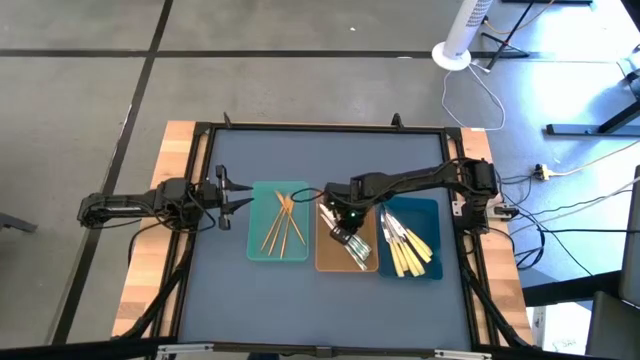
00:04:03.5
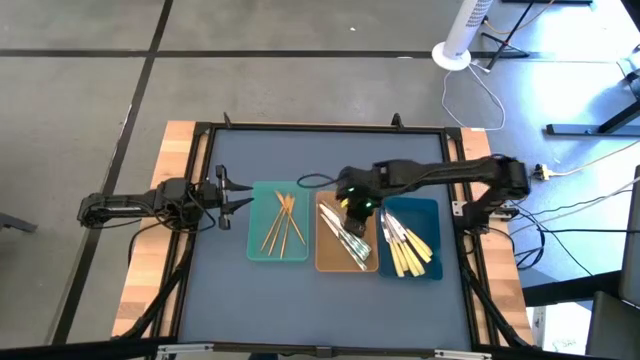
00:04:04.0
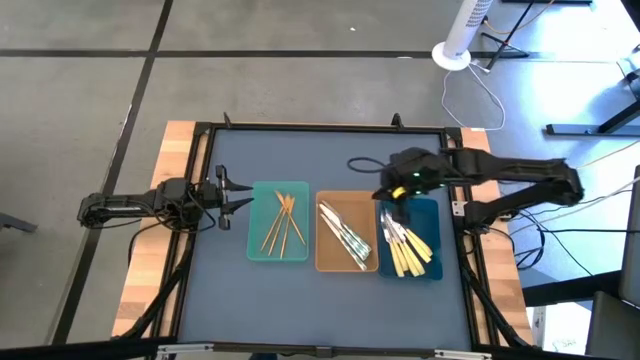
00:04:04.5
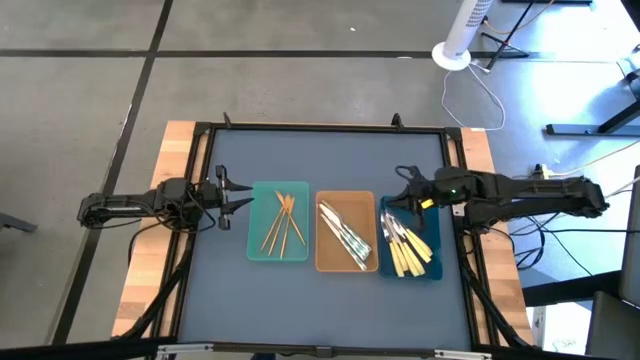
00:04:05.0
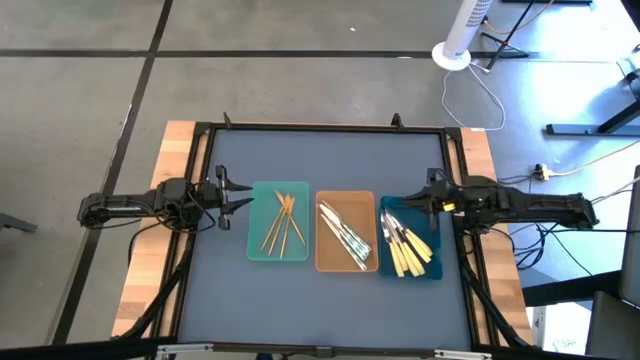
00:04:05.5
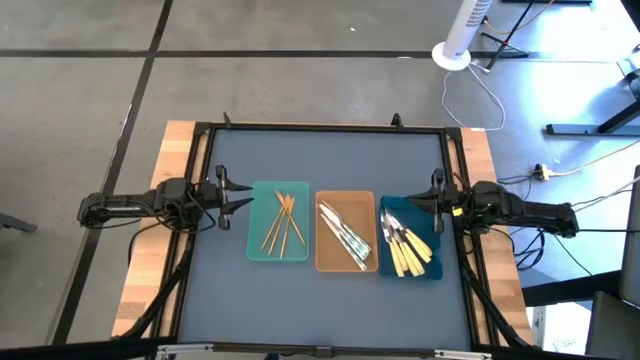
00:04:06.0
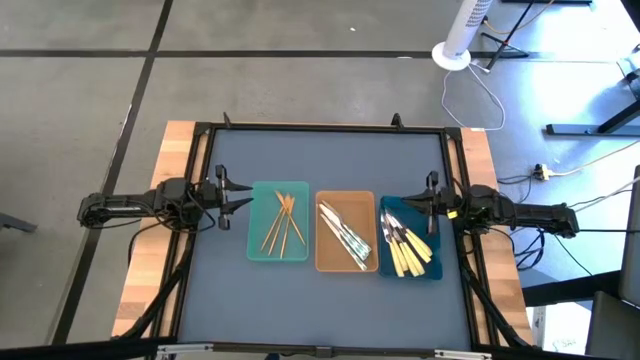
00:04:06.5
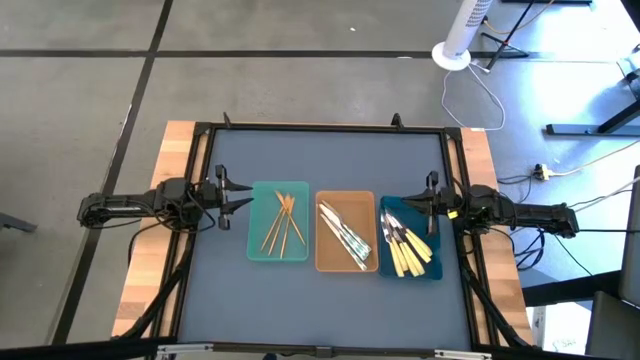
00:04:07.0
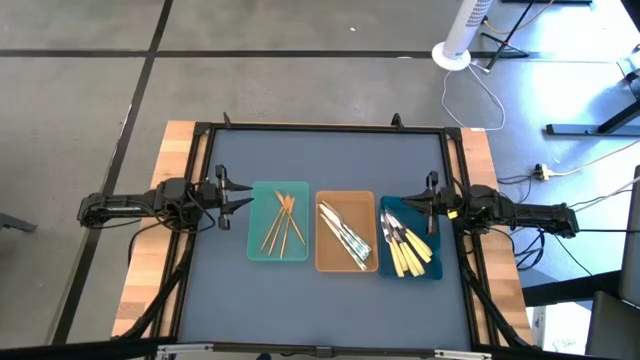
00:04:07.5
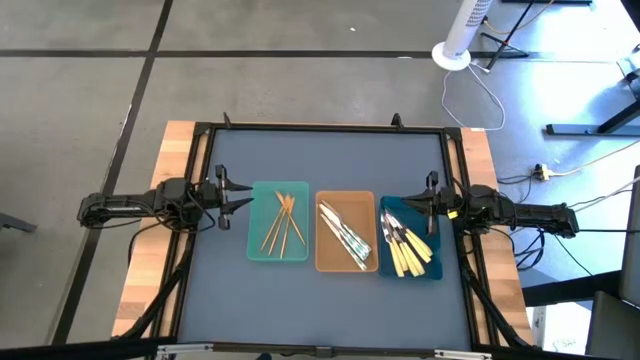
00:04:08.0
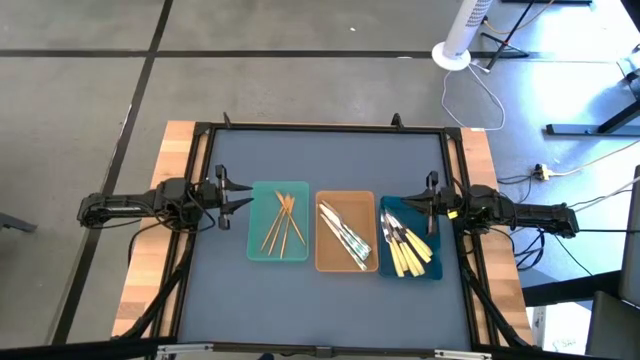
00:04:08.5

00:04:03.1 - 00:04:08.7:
Task: Sort silverware by color (type)
Return to Home Position

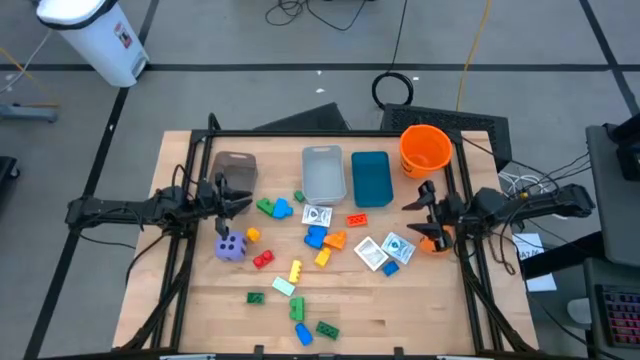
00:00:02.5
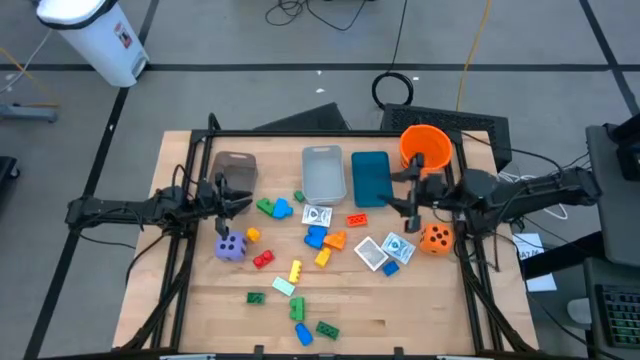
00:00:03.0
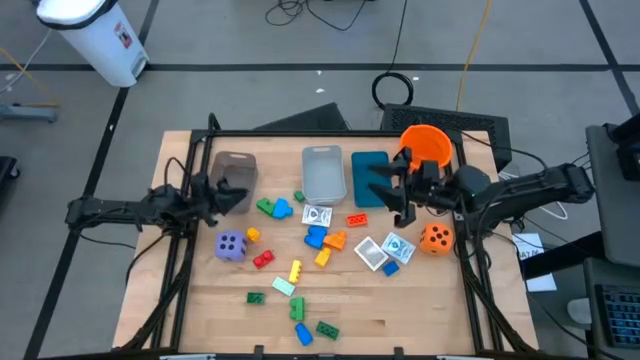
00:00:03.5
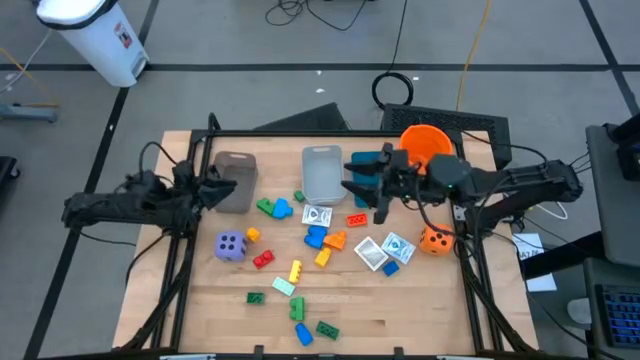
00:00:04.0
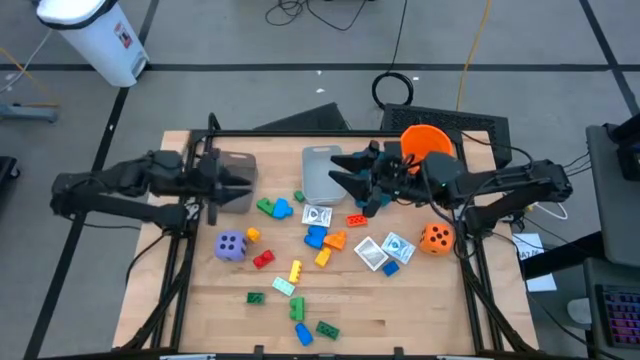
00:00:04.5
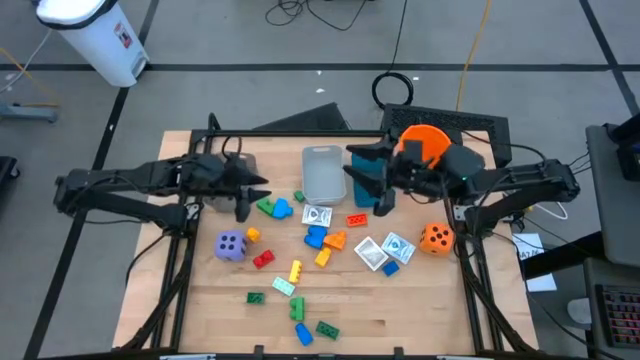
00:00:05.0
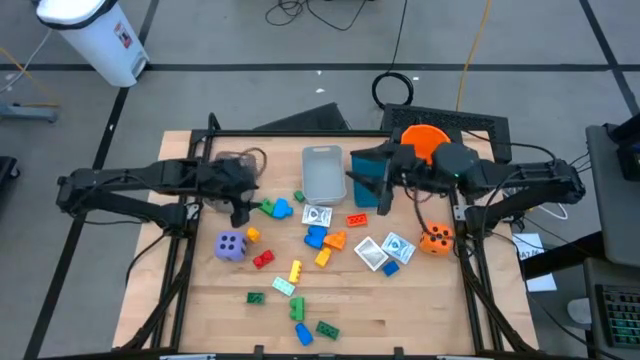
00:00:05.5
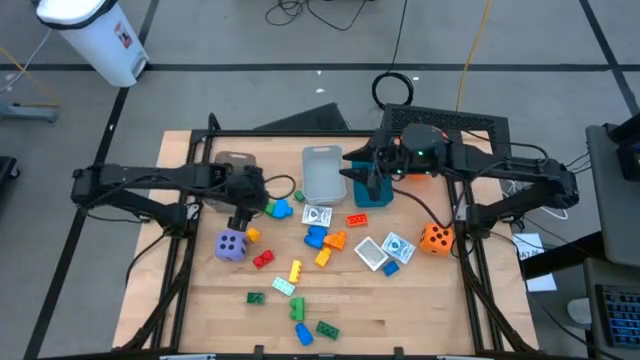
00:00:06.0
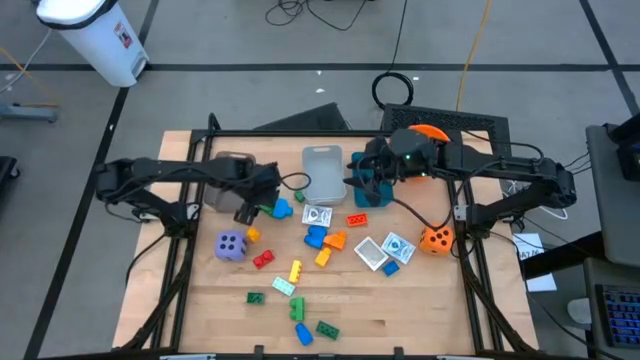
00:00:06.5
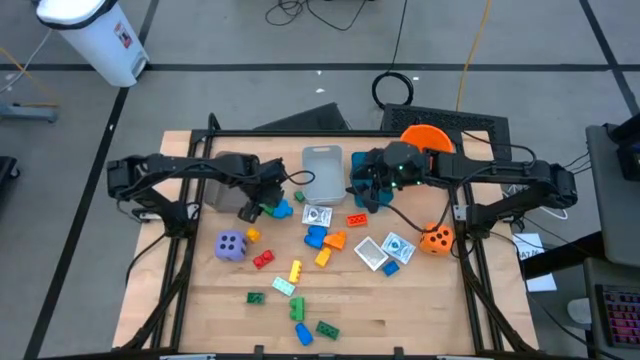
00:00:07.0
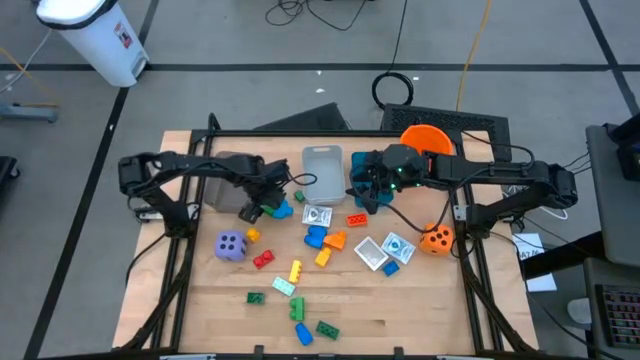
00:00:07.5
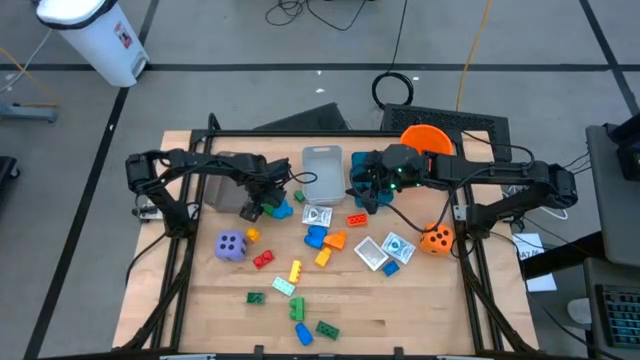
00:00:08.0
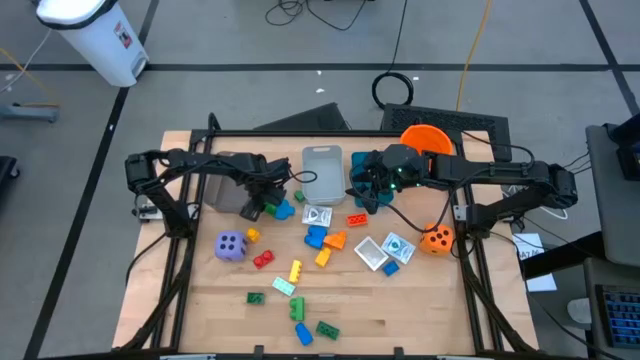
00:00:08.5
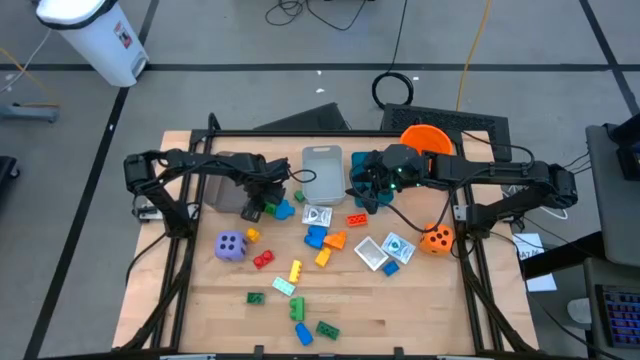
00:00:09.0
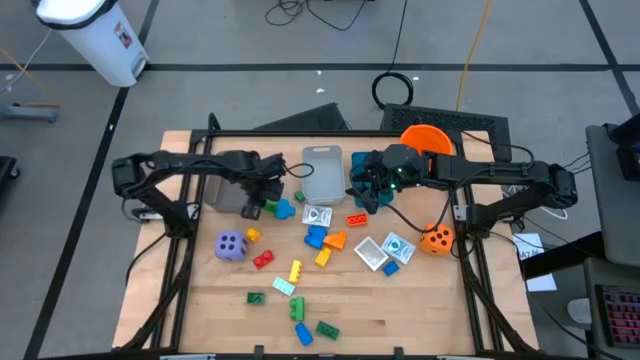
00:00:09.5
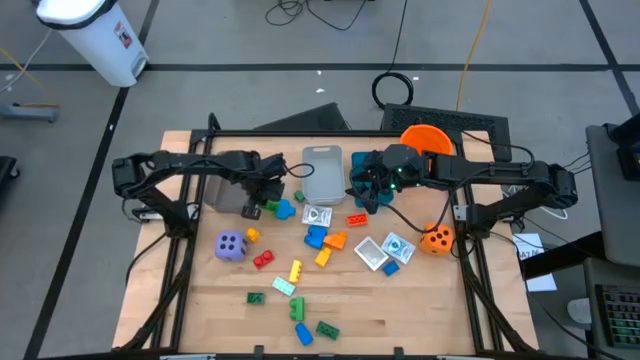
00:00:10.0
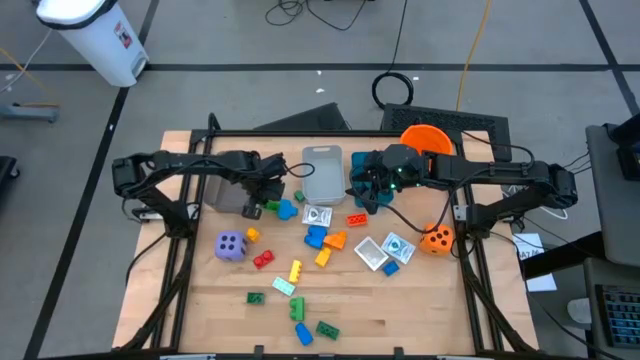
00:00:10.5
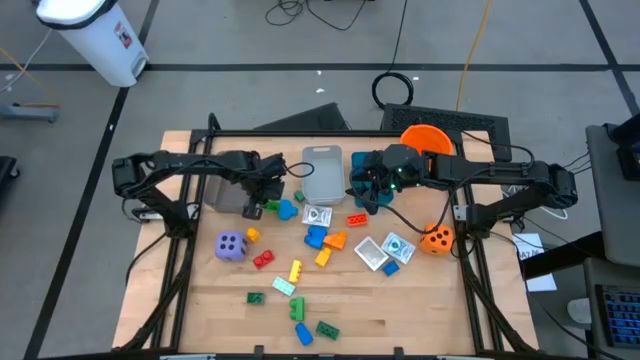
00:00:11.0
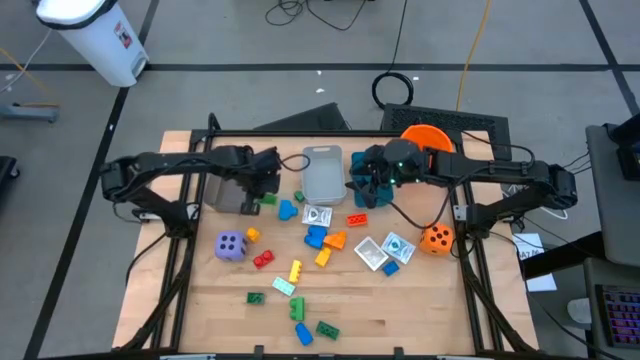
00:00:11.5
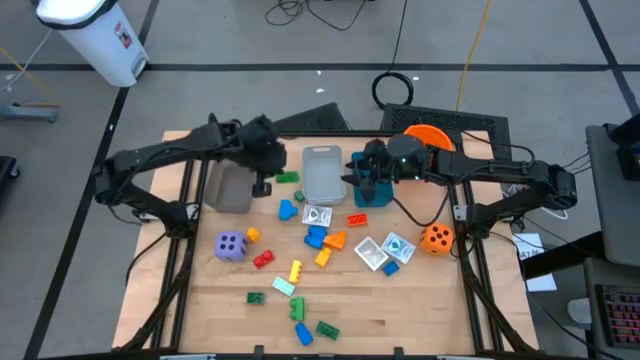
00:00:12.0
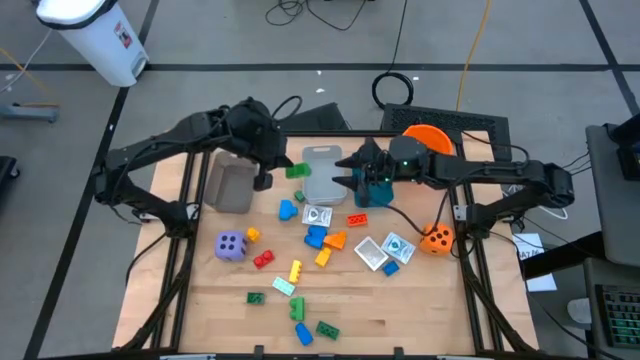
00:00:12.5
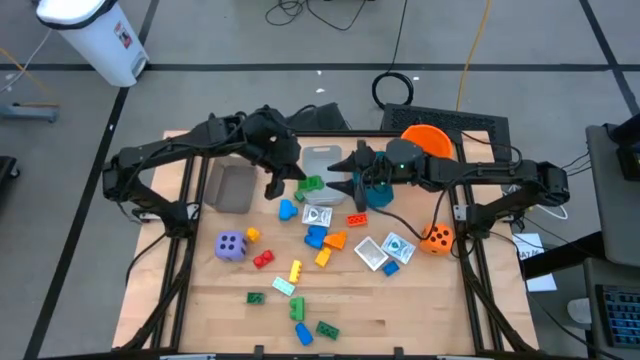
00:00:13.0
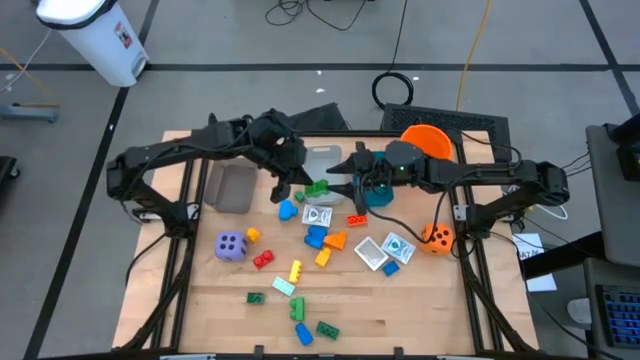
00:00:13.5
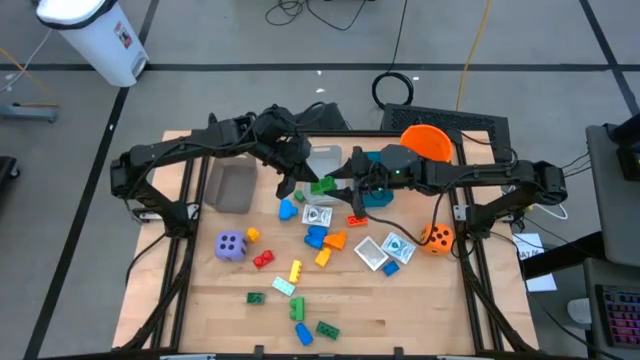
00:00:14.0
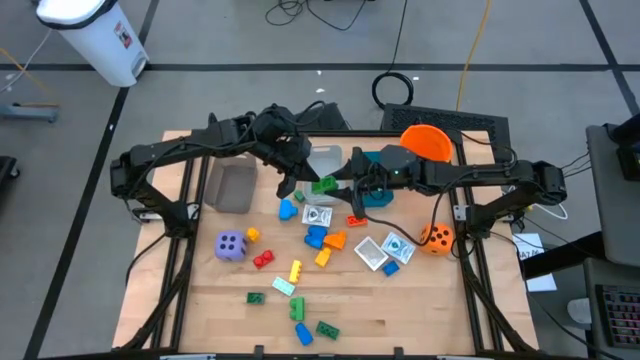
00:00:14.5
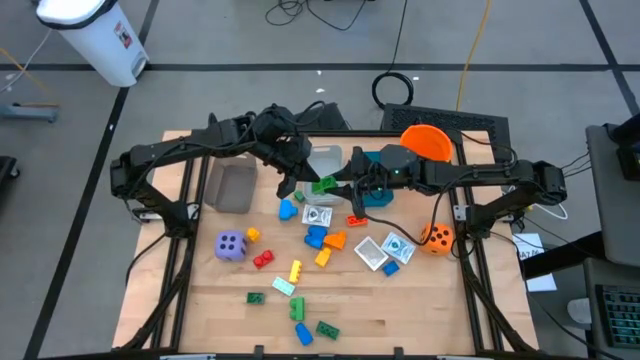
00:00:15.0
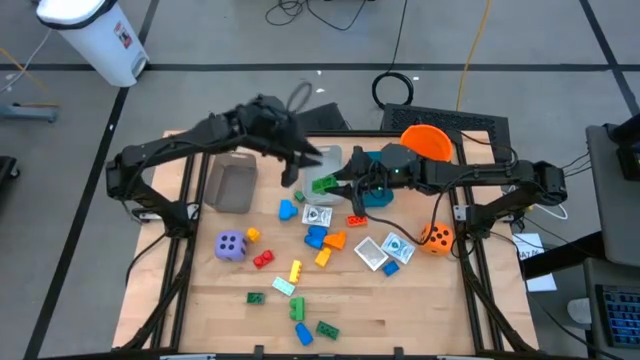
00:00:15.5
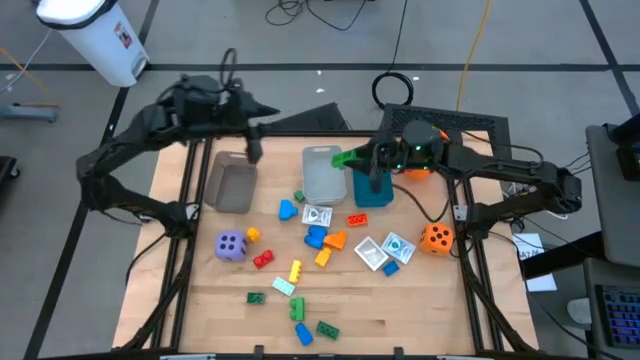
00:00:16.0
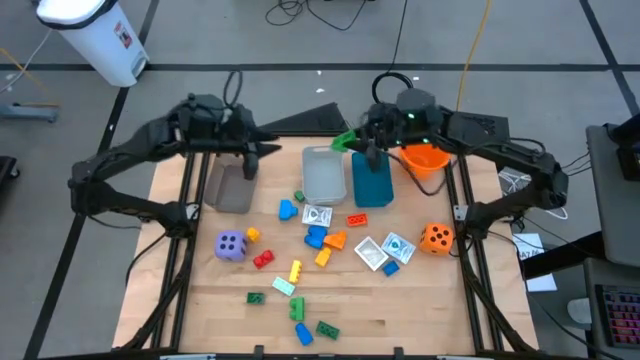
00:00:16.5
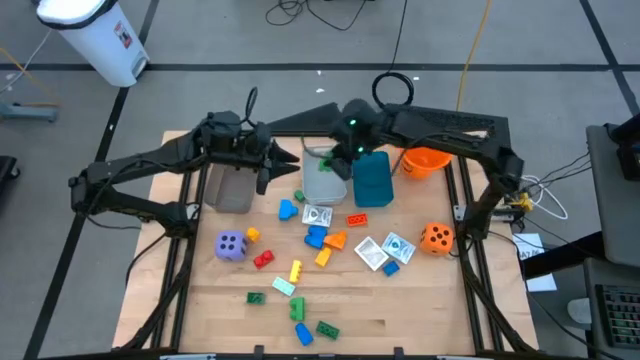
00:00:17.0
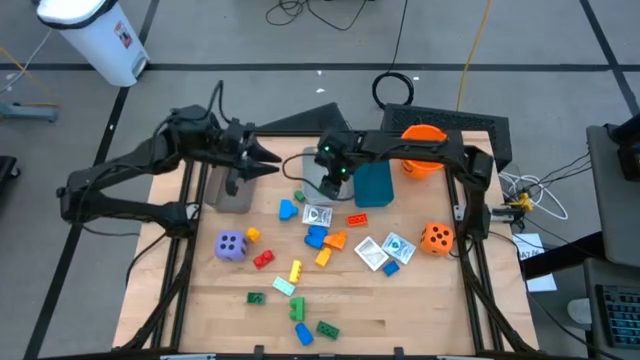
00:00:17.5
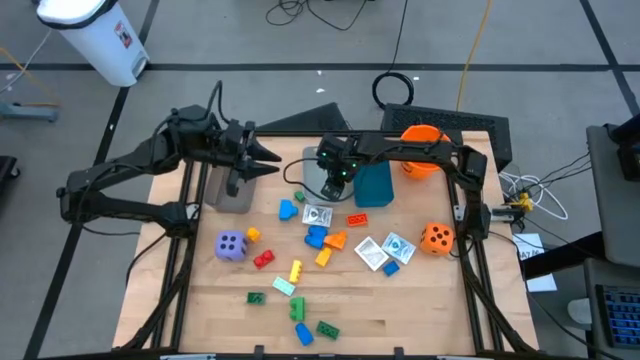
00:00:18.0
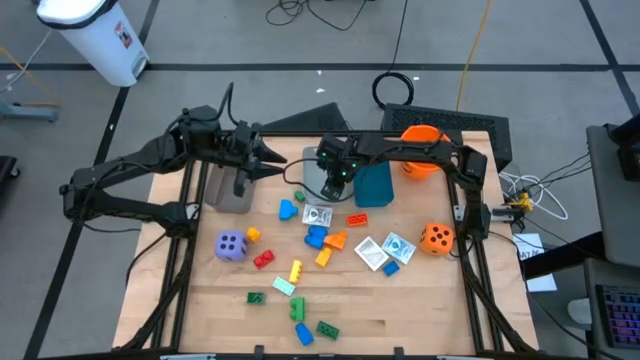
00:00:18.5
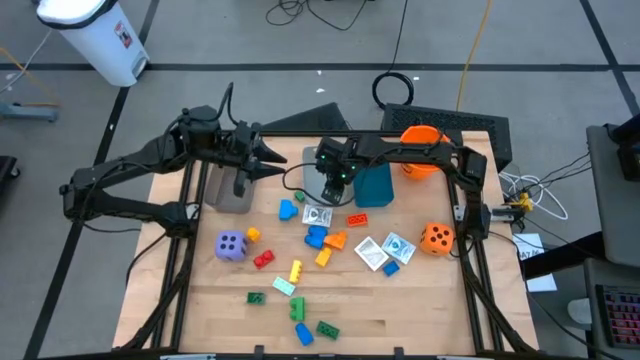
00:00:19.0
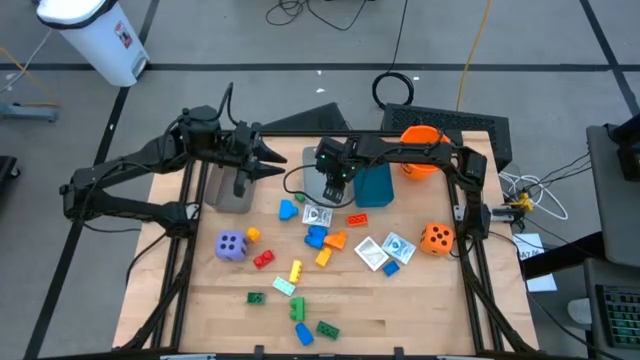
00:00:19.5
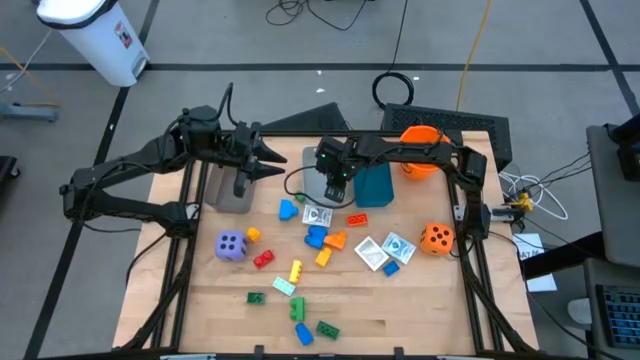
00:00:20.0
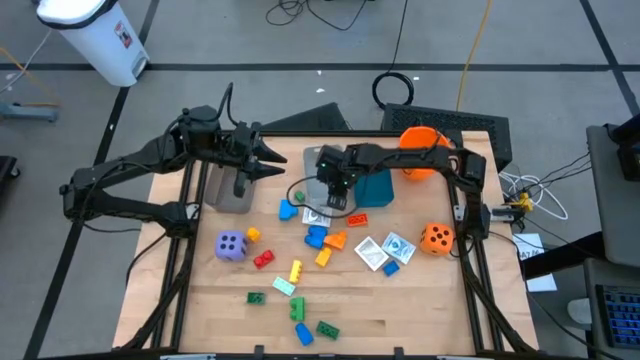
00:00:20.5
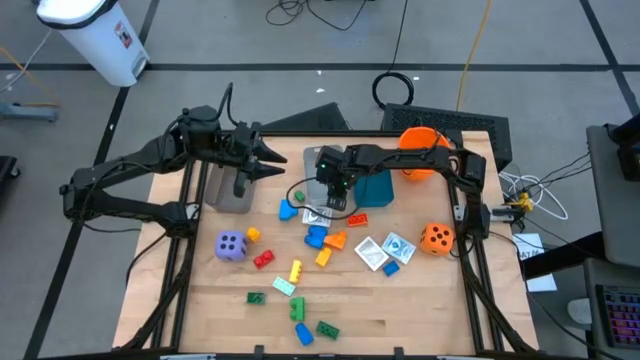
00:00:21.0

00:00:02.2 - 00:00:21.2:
Task: Pick & Place Toys
Put the green game piece into the gray bin
